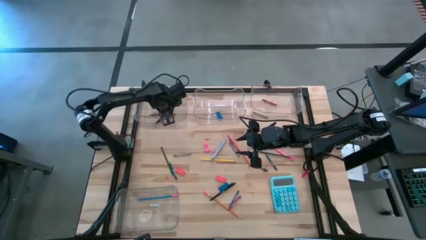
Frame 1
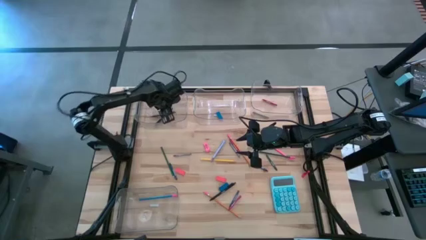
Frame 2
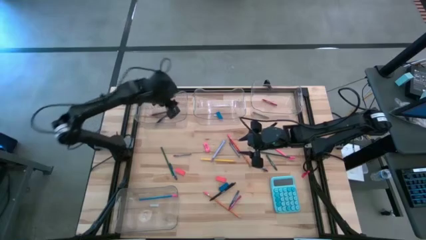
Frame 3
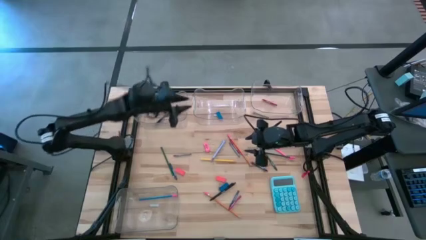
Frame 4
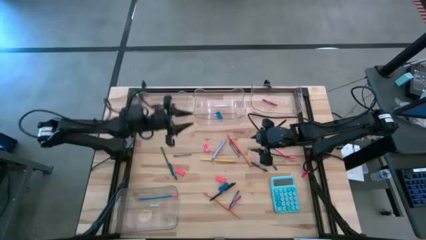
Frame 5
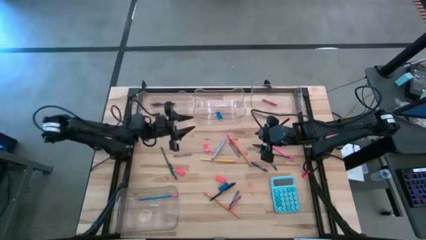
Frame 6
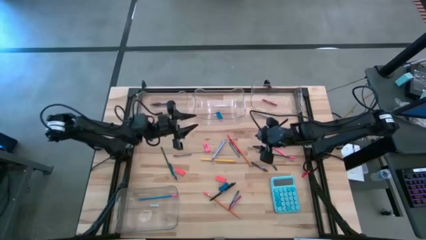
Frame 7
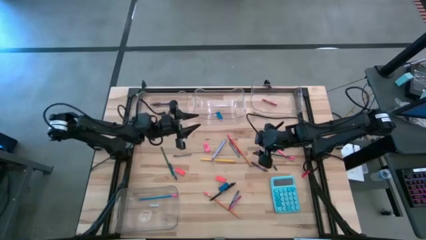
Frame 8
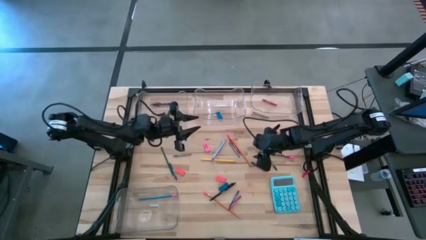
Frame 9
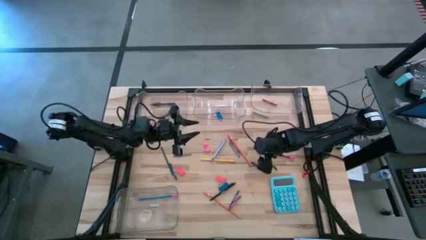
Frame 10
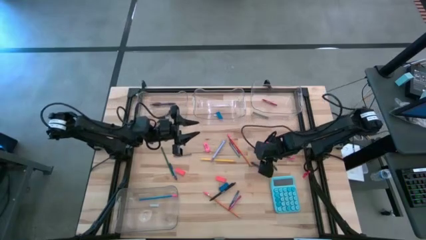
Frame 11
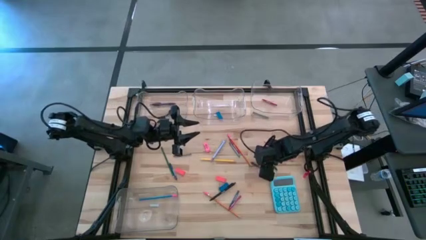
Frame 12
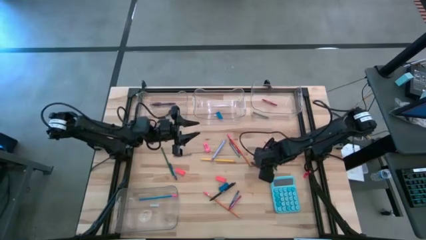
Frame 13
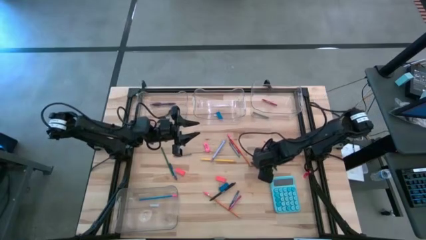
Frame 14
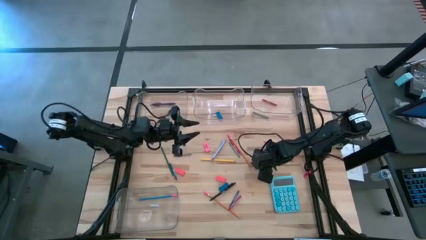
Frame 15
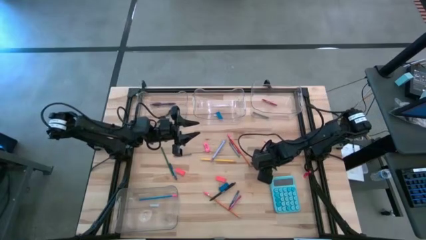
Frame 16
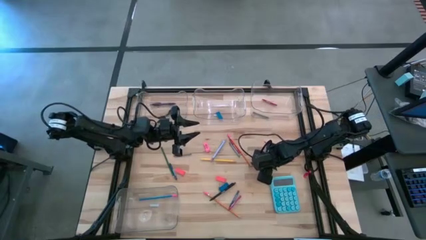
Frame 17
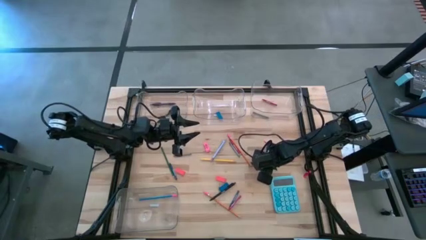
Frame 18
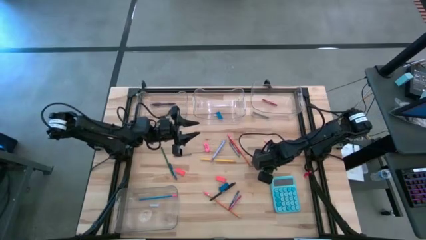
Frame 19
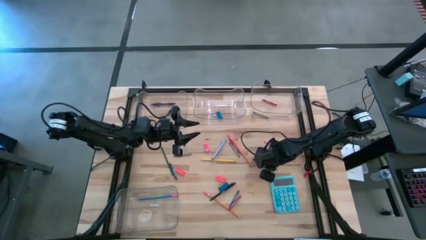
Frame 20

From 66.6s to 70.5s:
Task: Sort crayons/erasers/pens/pencils in bins
Put the blue crayon into the top right transparent bin

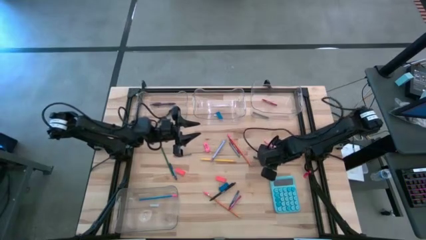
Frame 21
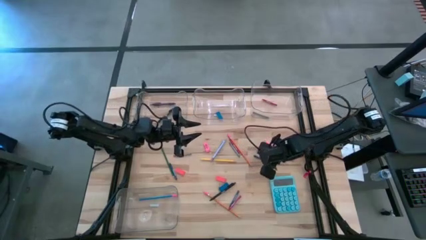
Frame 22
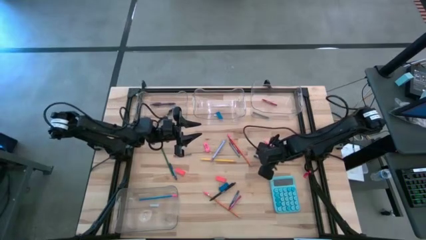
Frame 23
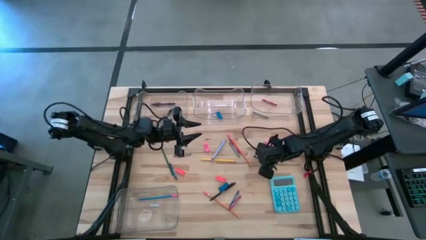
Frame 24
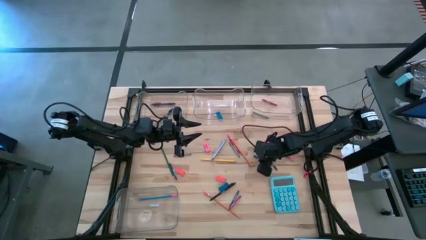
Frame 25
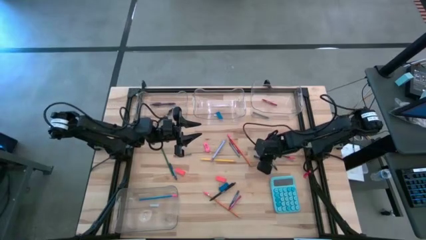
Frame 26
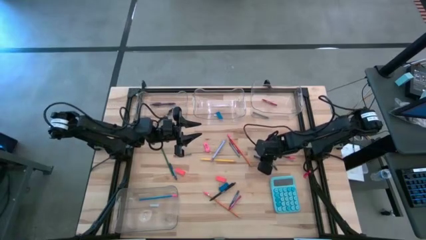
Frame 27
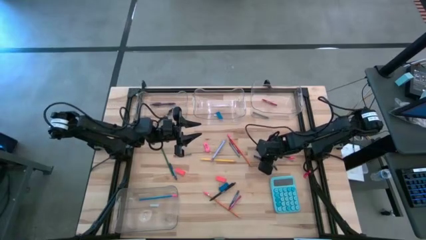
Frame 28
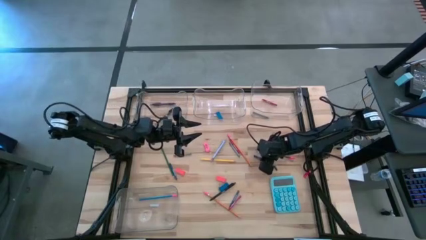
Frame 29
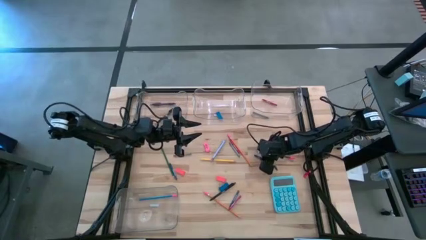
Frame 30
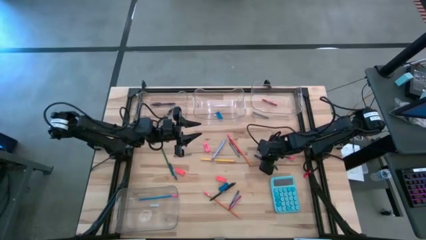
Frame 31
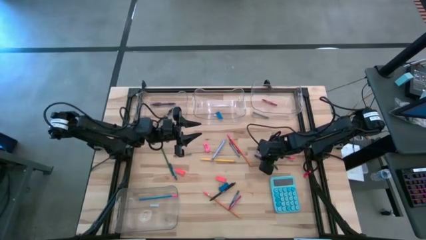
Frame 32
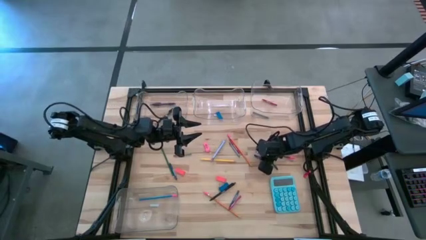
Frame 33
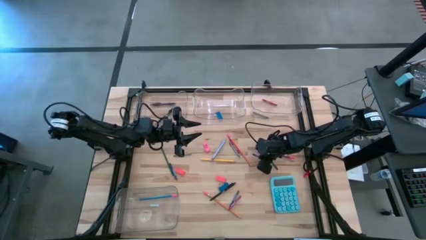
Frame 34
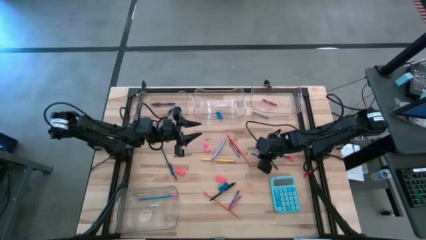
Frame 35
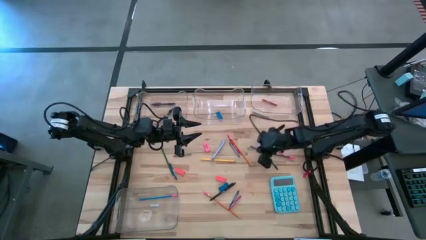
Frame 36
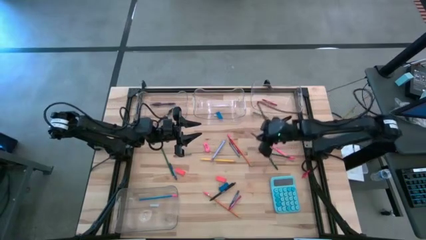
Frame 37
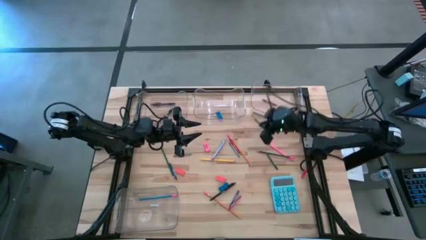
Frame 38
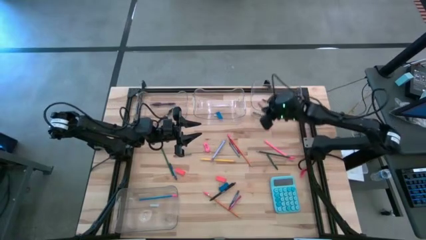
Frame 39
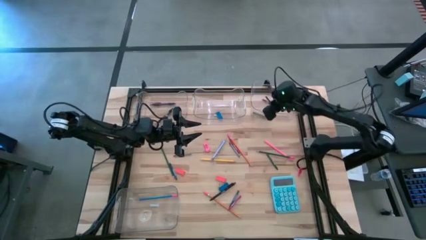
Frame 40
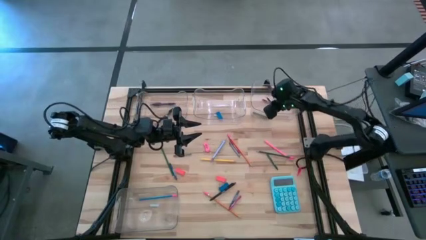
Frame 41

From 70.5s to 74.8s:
Put the blue crayon into the top right transparent bin

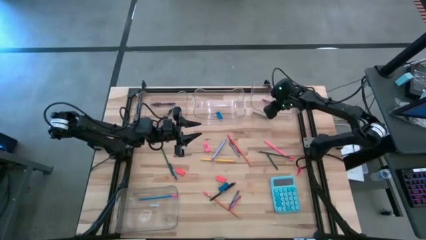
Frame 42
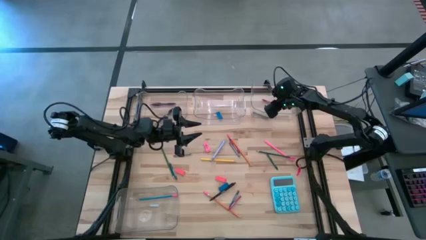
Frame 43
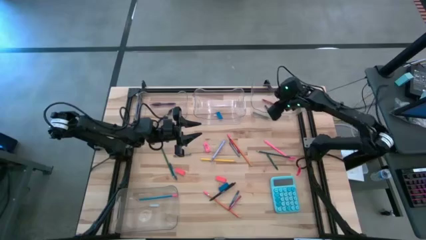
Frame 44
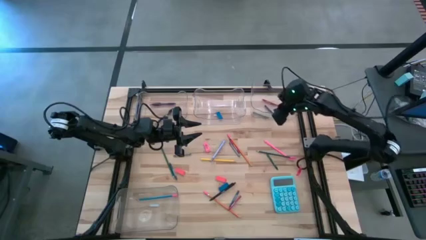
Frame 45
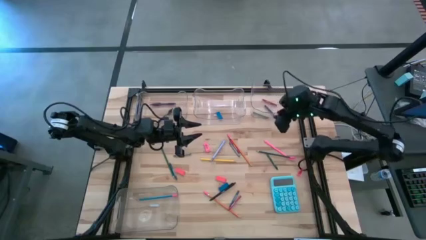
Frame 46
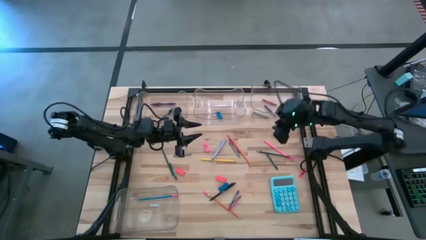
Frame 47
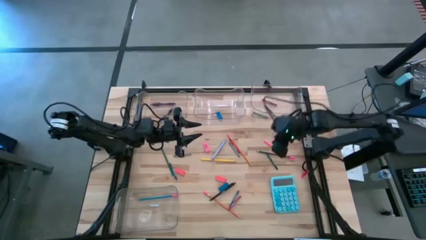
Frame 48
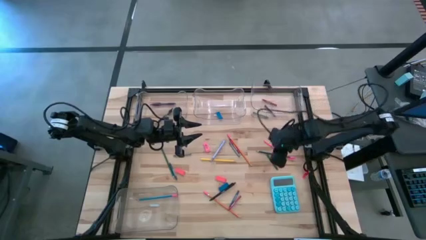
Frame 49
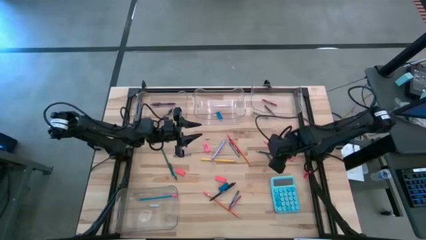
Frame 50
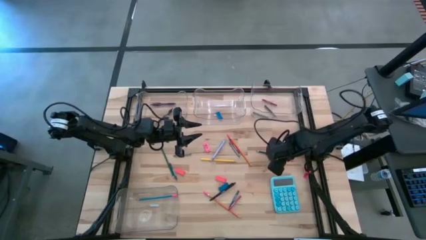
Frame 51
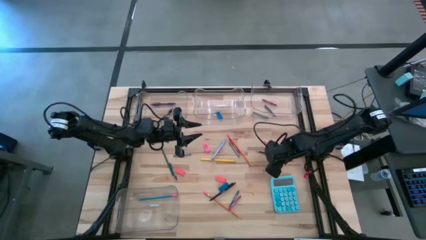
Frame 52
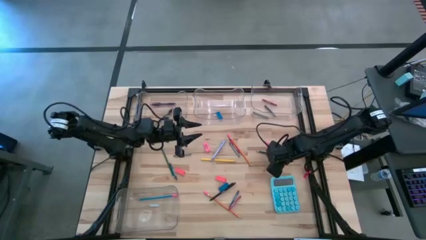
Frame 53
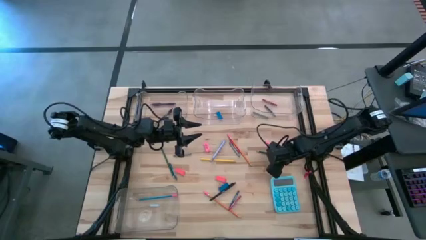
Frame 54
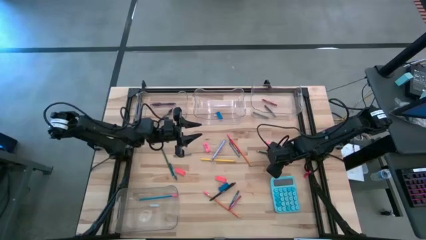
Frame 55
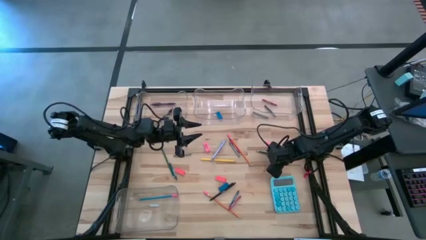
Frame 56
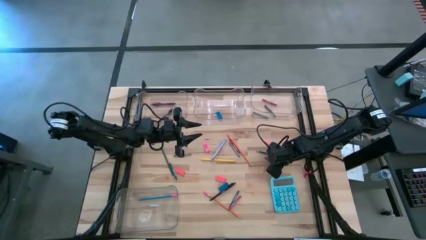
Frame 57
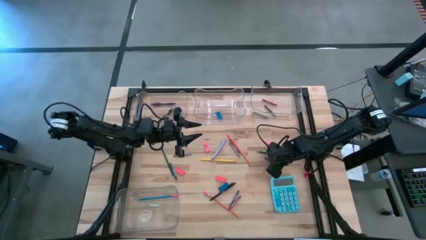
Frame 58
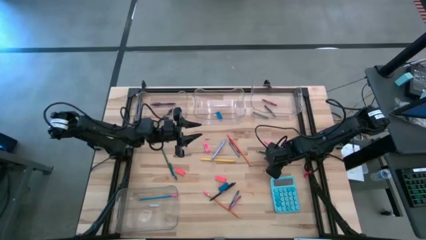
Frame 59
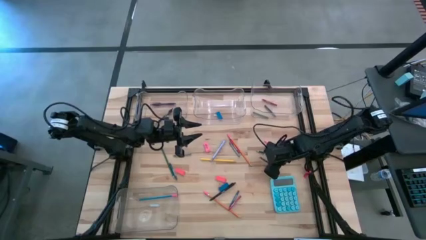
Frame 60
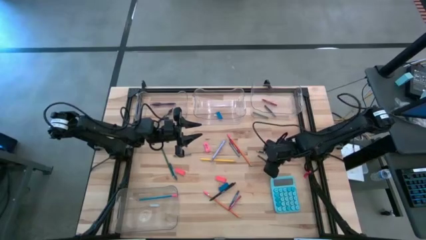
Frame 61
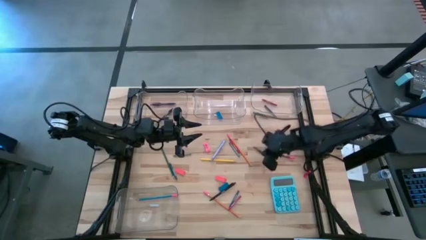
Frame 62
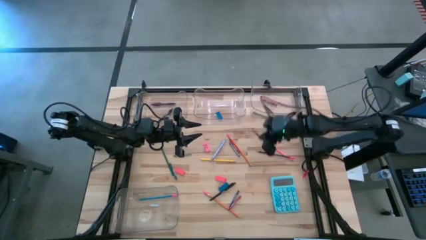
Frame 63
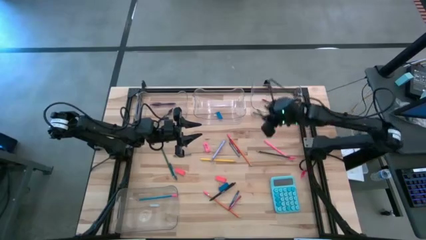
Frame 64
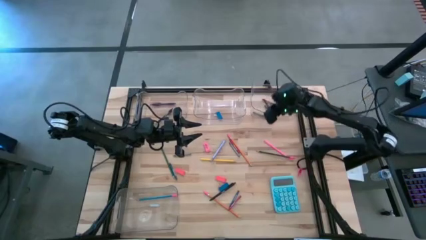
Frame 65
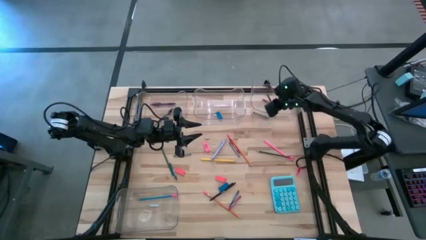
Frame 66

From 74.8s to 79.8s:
Put the green crayon into the top right transparent bin

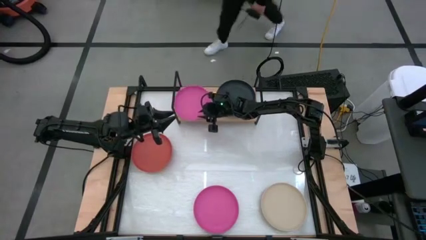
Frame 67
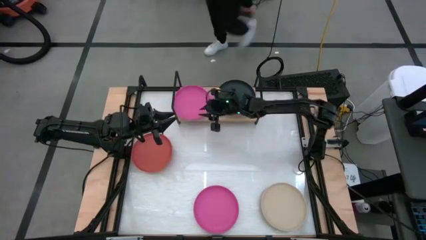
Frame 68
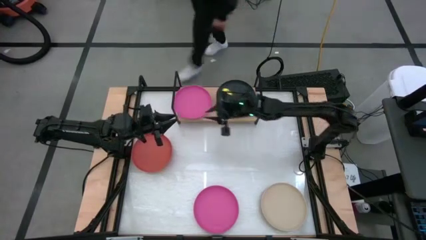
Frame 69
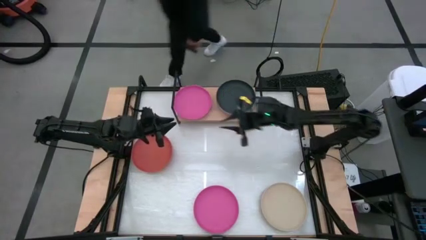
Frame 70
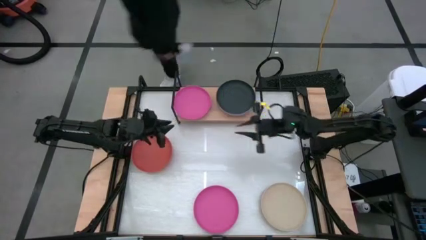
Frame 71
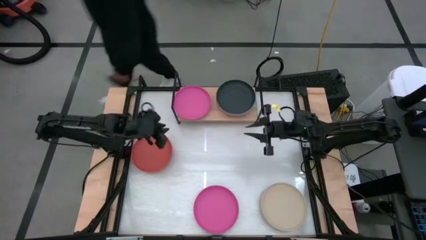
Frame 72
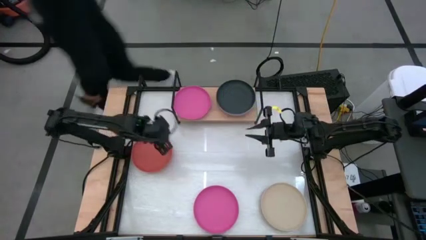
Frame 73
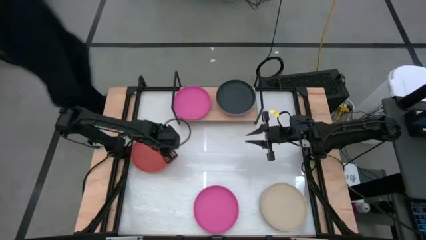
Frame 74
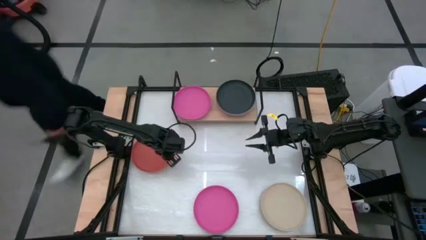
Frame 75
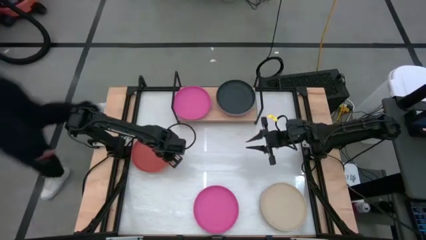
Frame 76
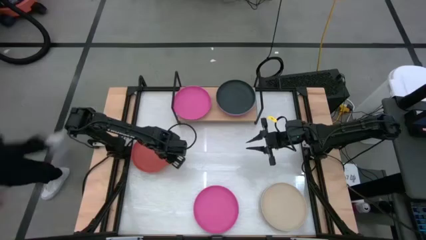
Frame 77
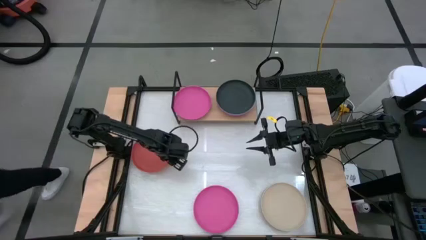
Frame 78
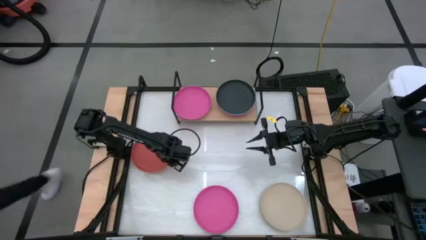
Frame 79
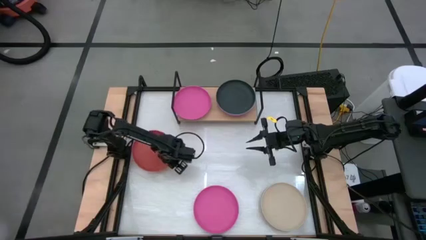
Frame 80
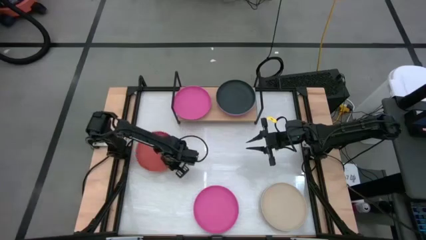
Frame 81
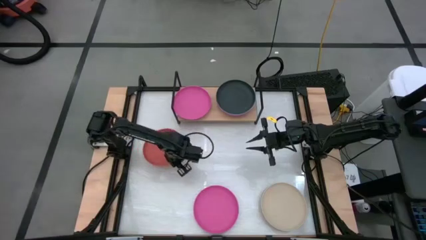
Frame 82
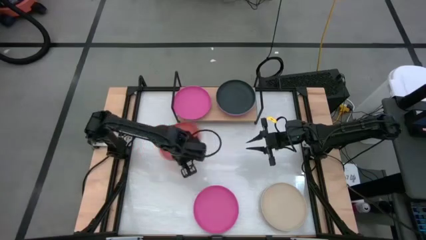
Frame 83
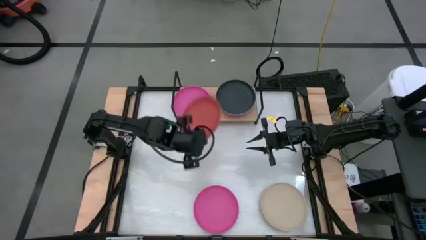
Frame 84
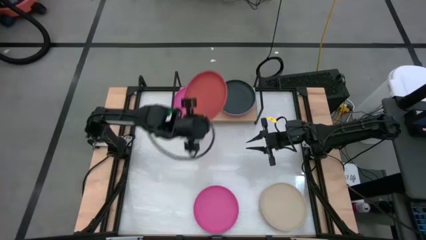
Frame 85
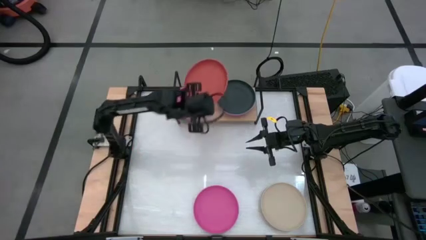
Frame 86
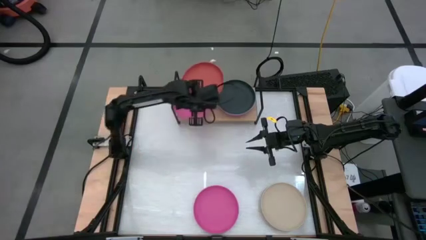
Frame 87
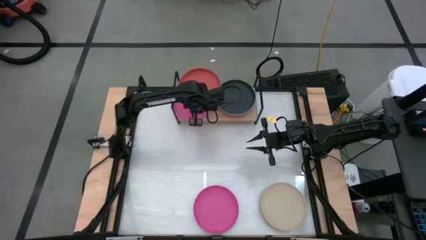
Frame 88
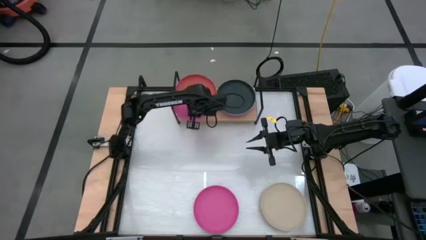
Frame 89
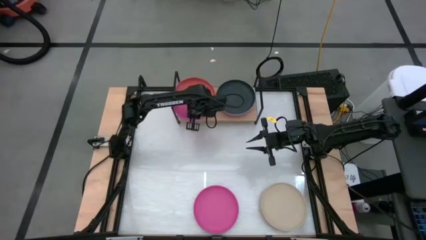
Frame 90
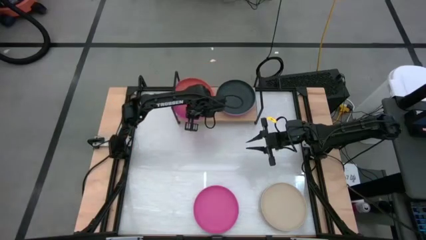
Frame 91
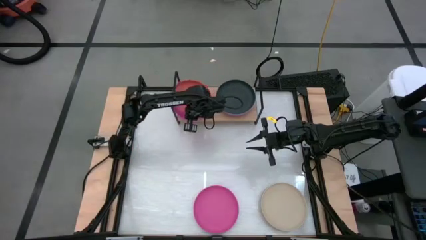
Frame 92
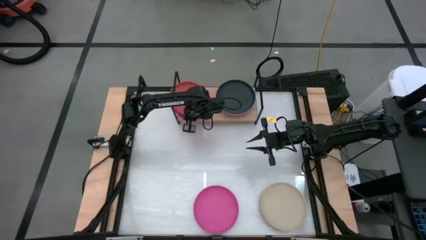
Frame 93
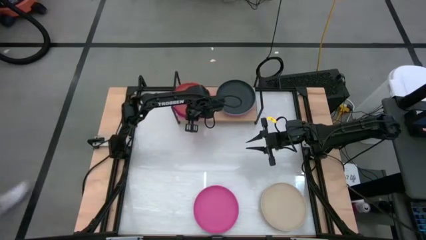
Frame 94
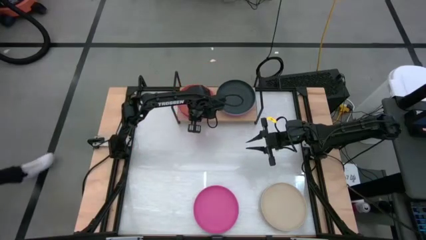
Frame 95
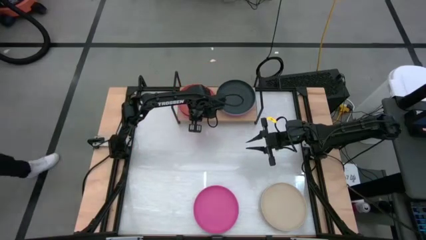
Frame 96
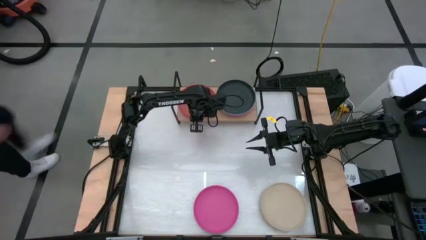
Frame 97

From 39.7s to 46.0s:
Task: Place and stack plates onto a shelf
Stack the orange plate on top of the pink plate on the shelf
